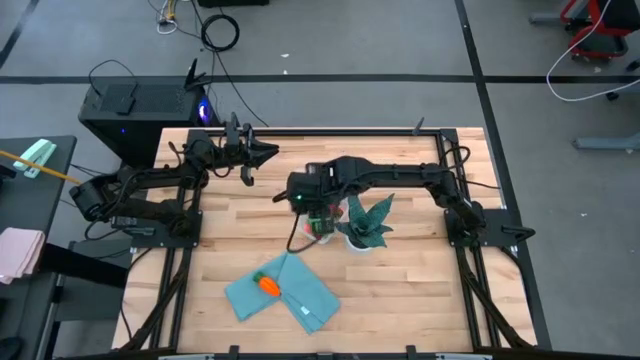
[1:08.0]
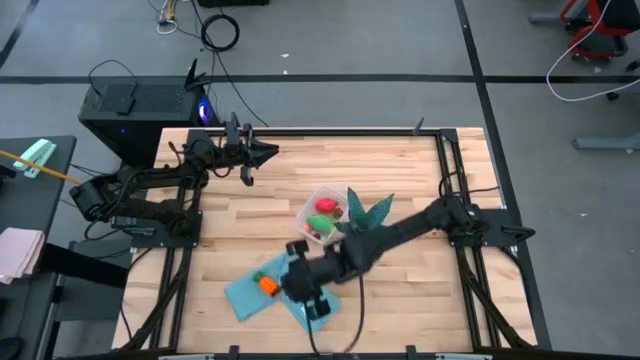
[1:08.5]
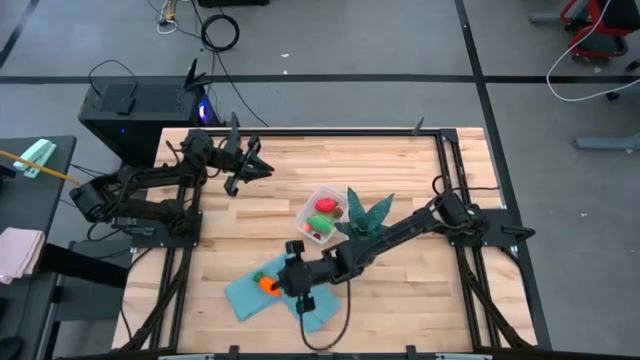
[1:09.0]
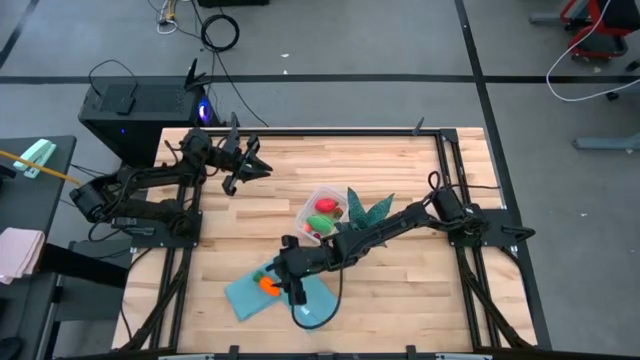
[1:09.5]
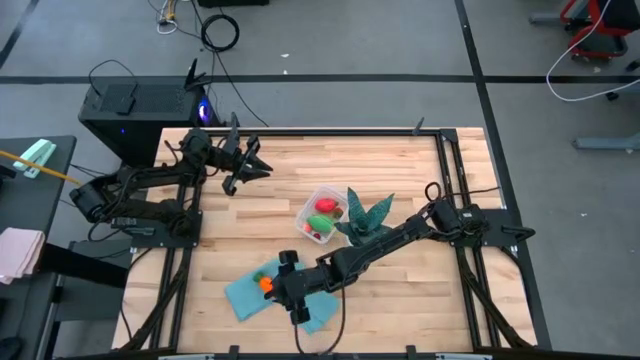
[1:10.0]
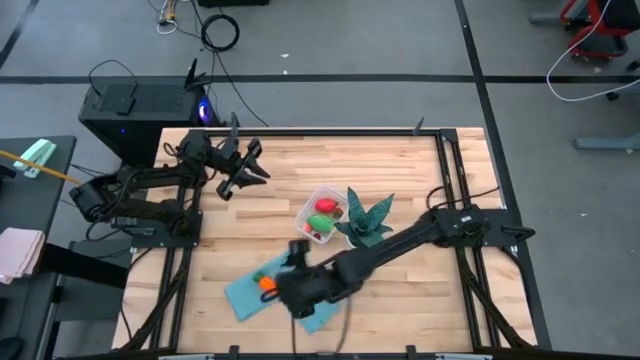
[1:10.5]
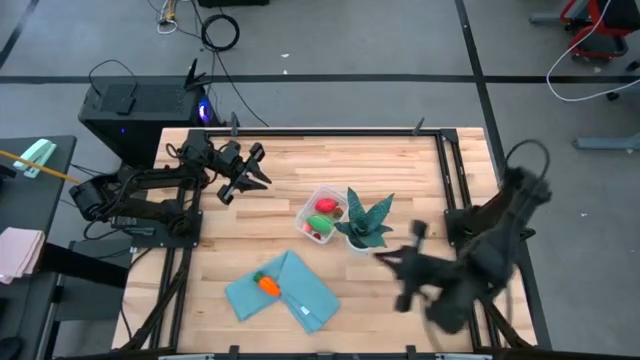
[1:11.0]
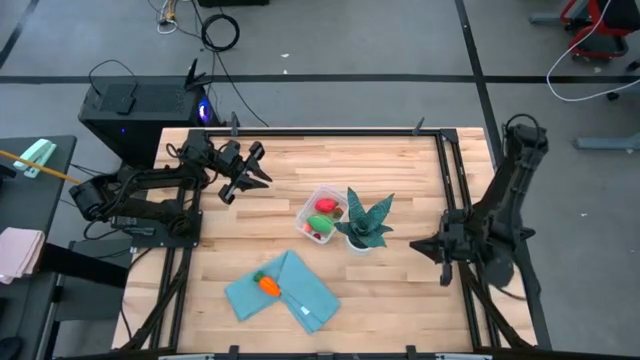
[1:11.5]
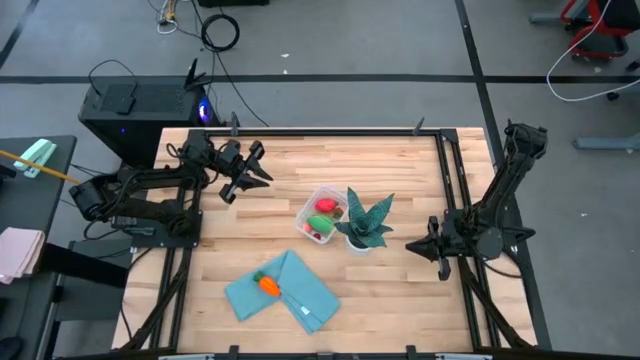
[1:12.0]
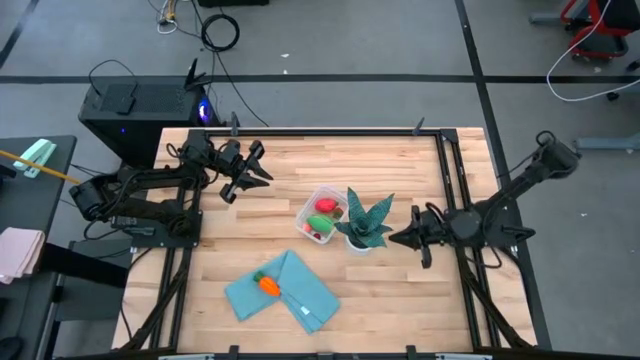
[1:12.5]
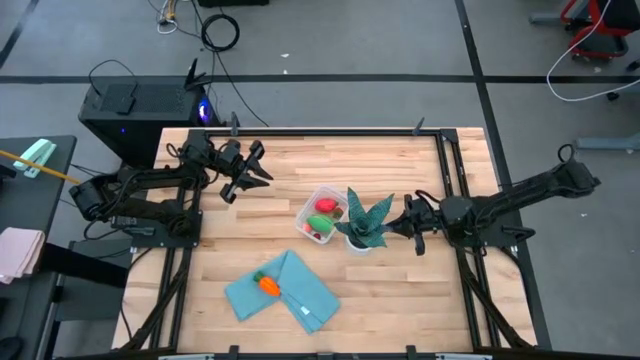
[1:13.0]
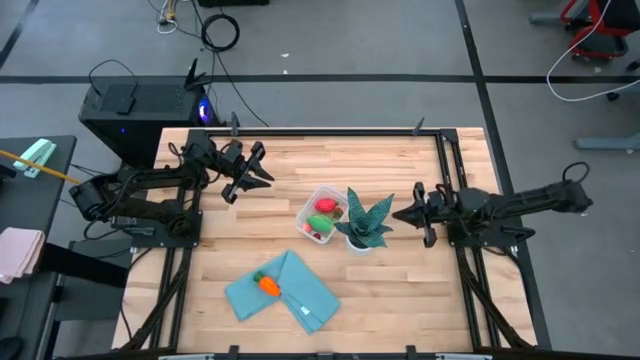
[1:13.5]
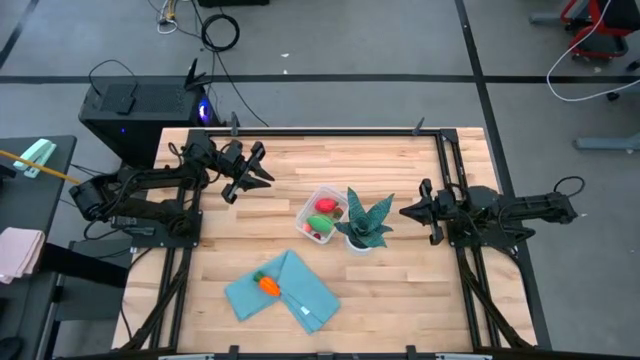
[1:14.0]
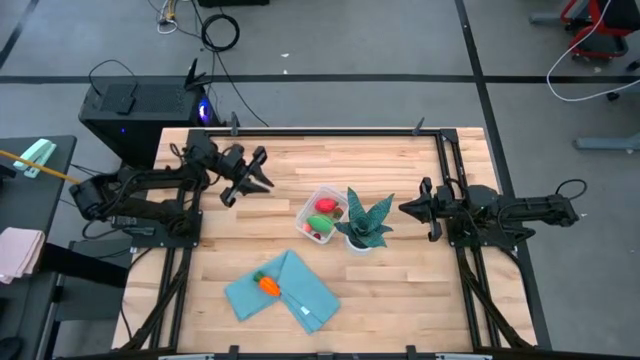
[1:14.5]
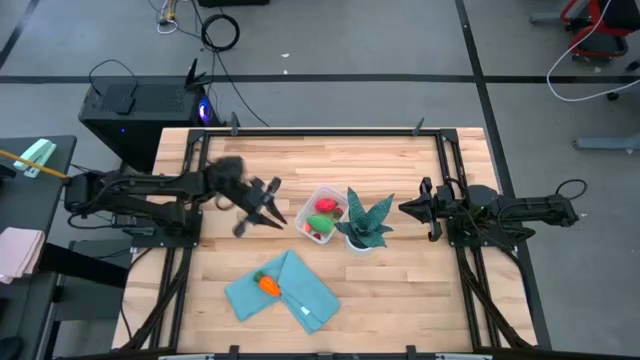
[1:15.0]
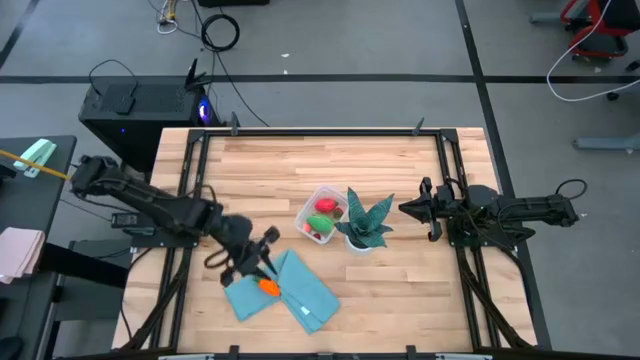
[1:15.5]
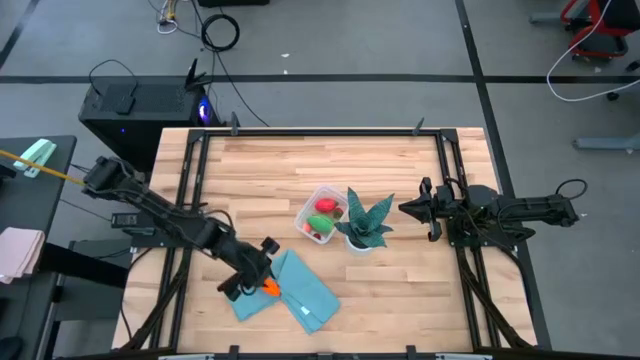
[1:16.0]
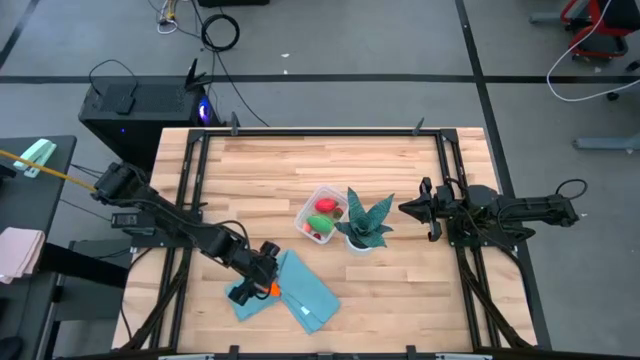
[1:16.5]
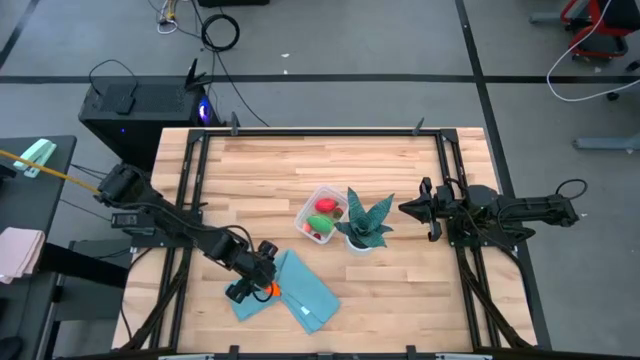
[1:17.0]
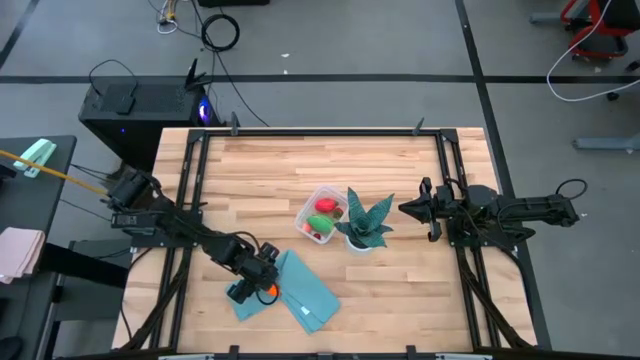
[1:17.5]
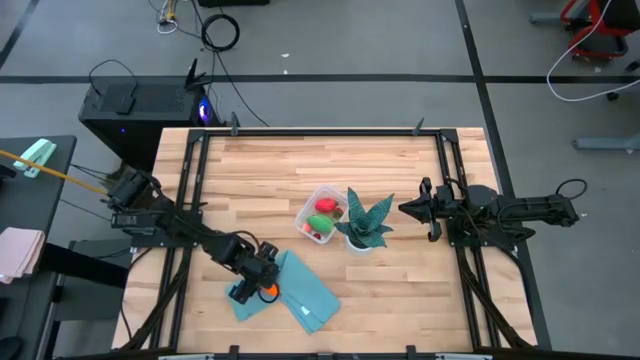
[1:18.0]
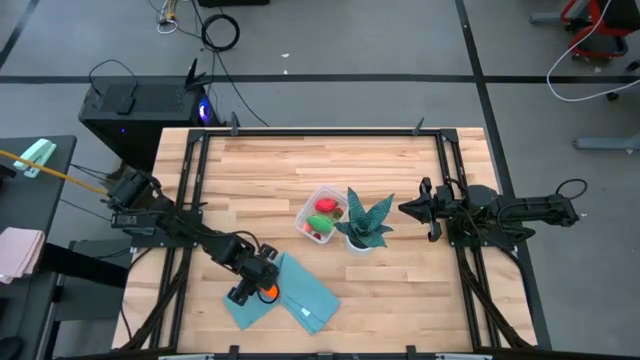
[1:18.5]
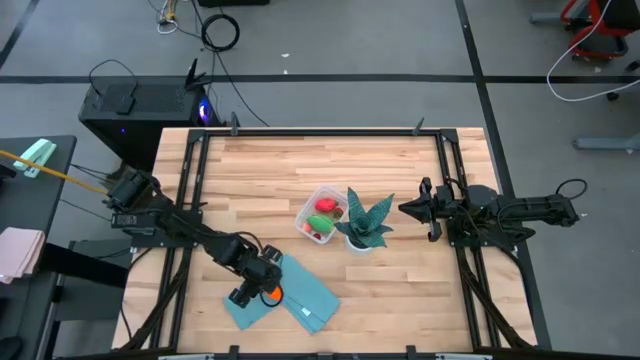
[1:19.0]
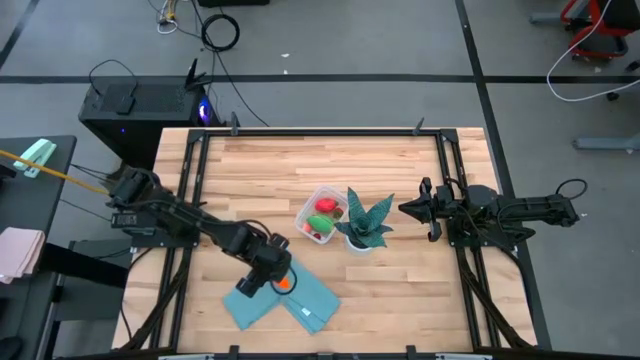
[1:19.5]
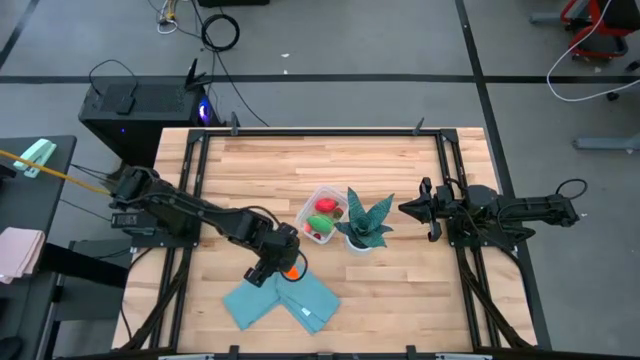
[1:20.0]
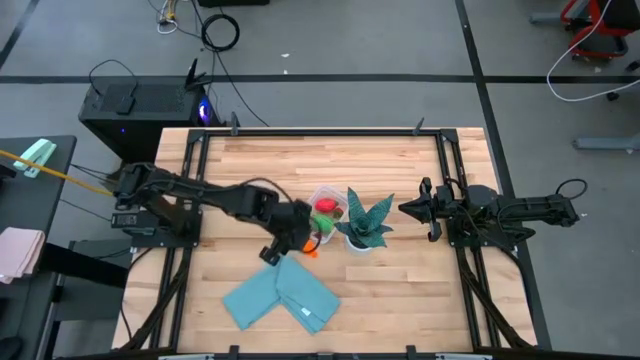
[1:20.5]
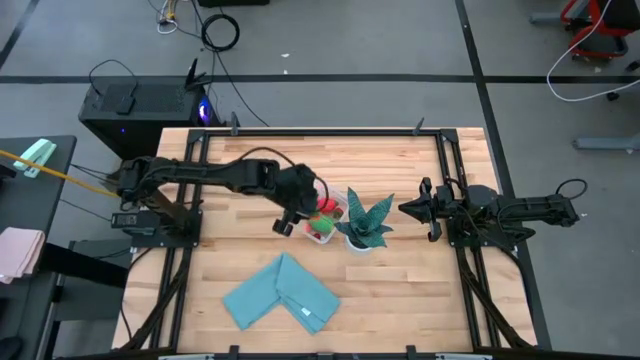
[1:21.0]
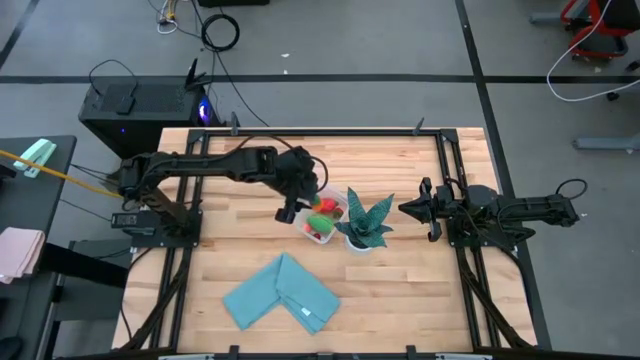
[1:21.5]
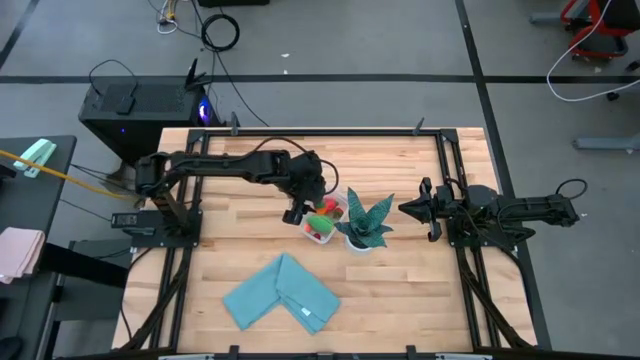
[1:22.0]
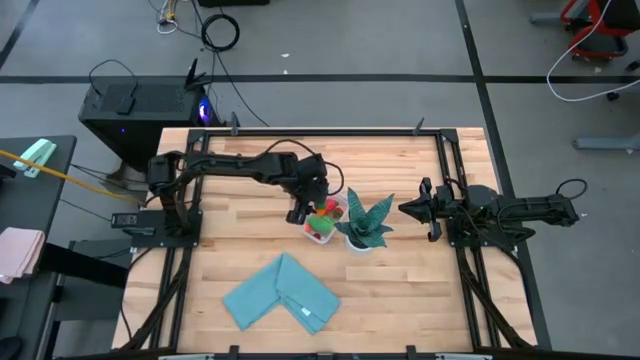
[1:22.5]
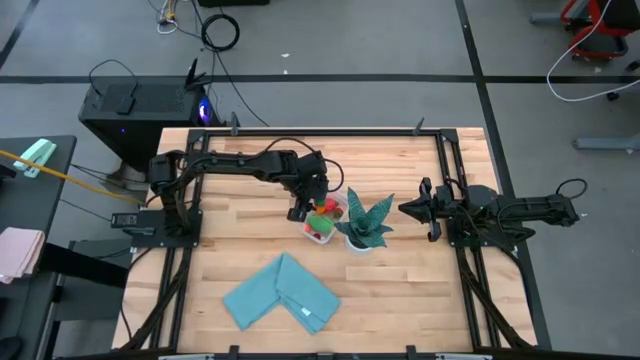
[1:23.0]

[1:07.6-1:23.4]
Task: Pick and placing Produce into tupperware
Put the carrot into the container

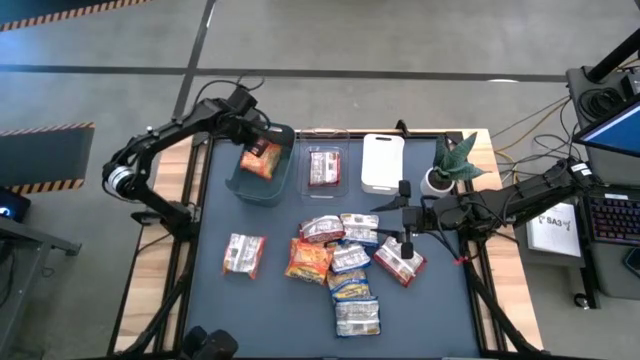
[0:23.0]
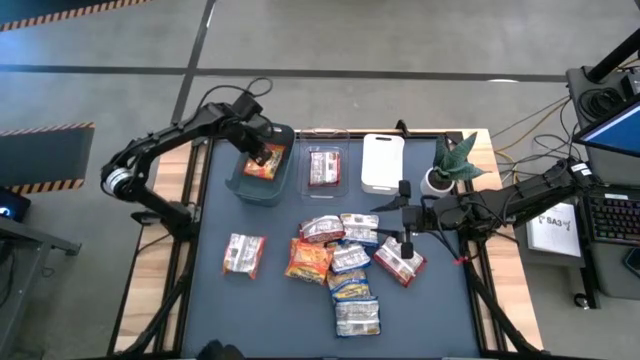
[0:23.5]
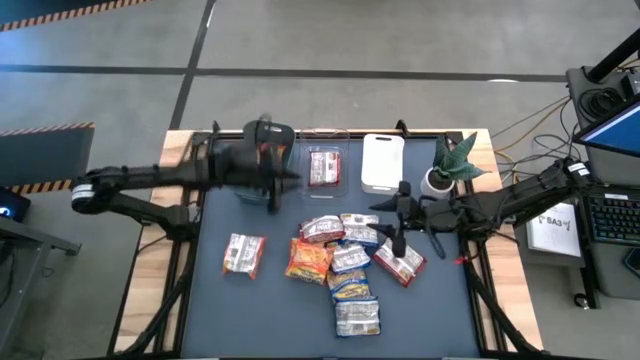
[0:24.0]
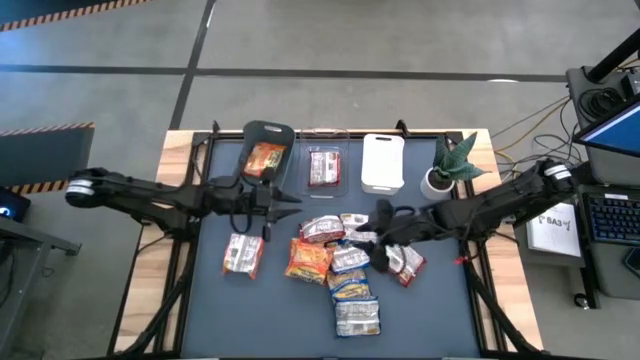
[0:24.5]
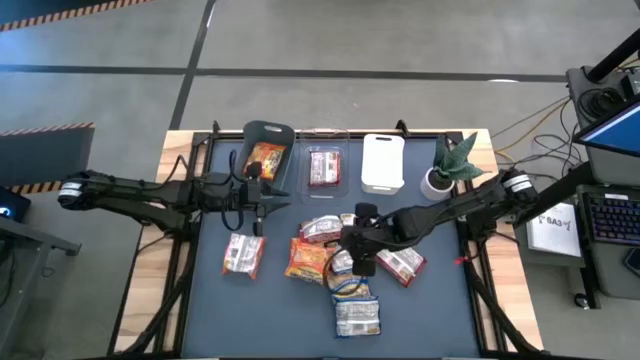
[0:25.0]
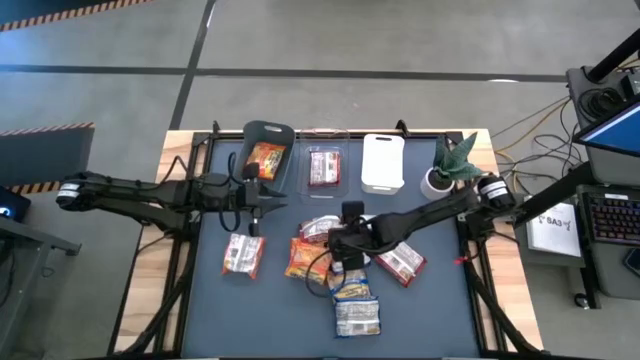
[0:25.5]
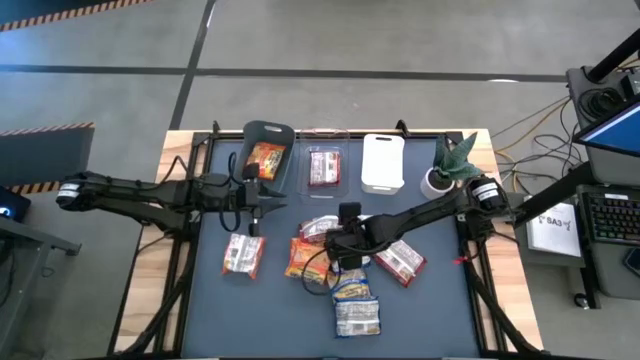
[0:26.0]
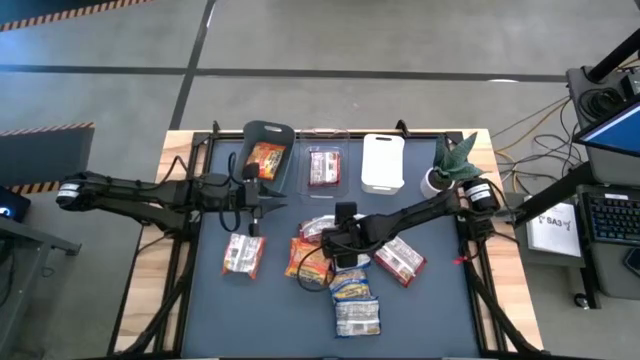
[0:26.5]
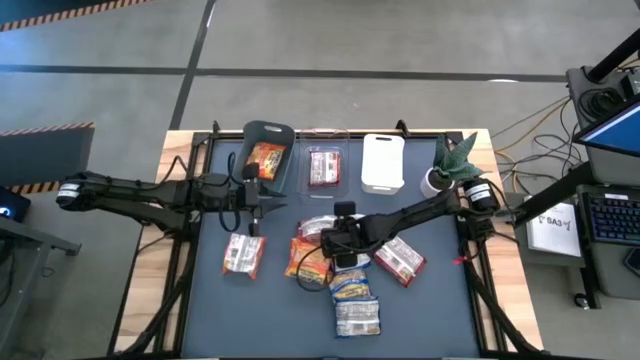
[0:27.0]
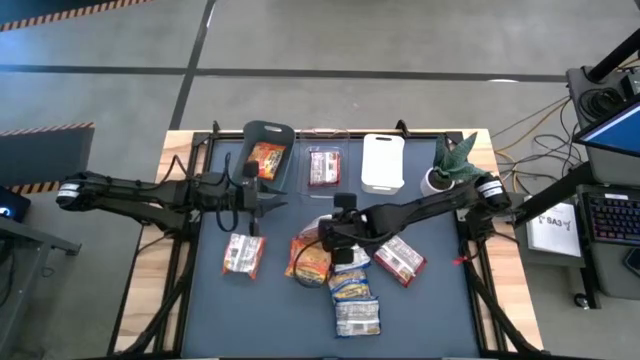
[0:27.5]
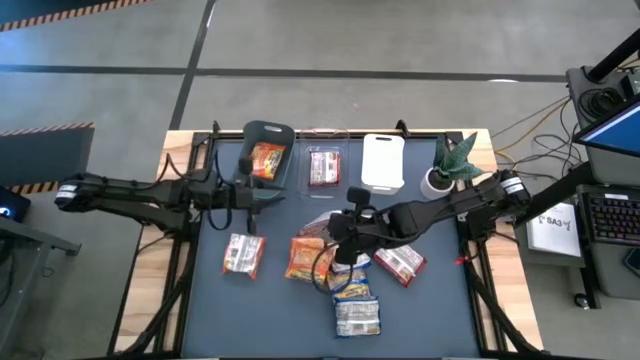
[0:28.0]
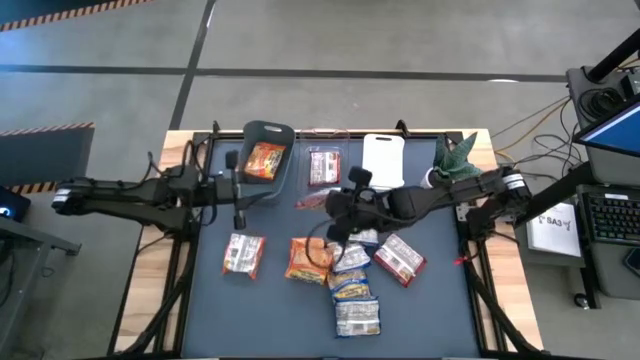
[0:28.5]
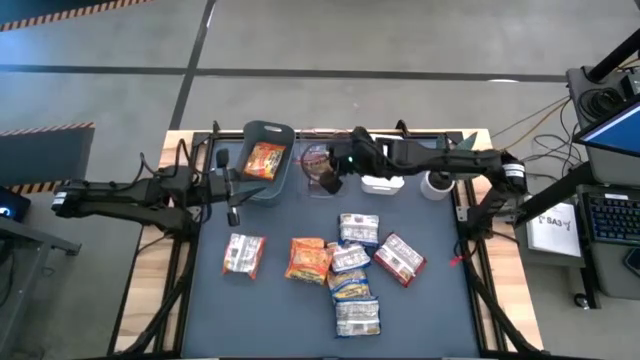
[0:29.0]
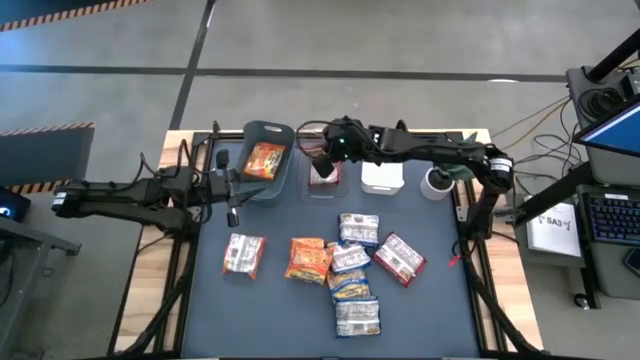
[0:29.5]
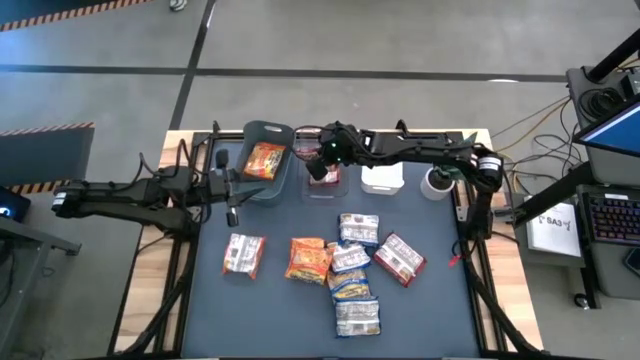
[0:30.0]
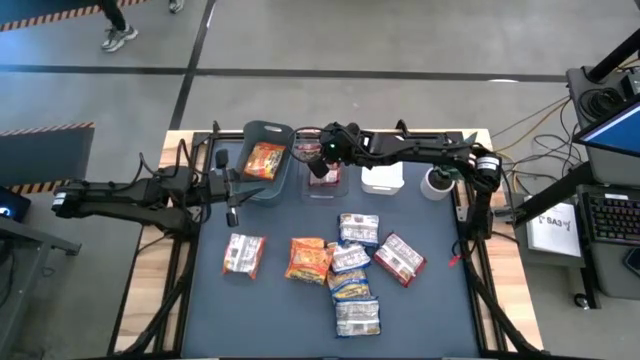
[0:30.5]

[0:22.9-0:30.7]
Task: Sort Maruchan noodles
Put the red noodle pack into the transparent bin
